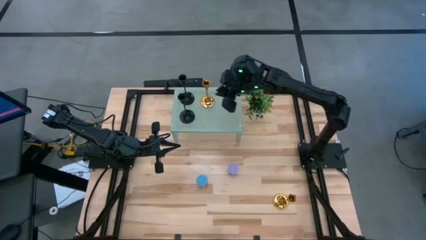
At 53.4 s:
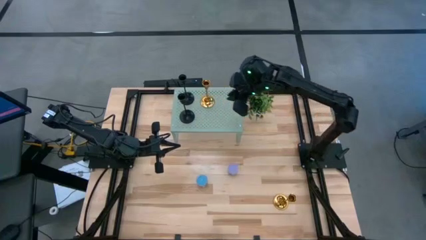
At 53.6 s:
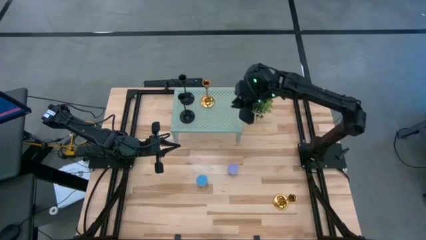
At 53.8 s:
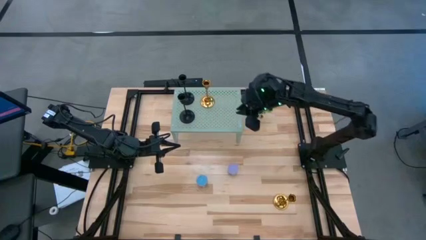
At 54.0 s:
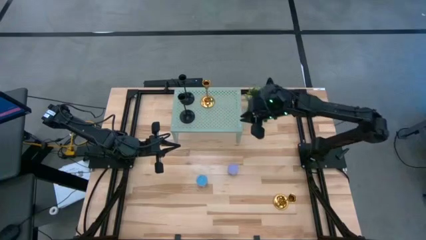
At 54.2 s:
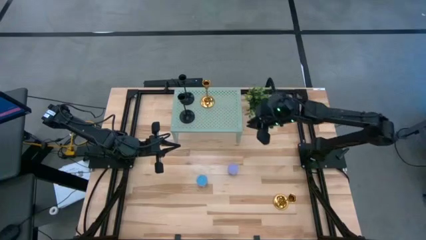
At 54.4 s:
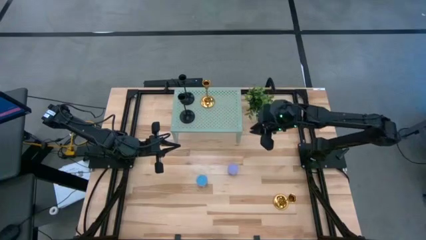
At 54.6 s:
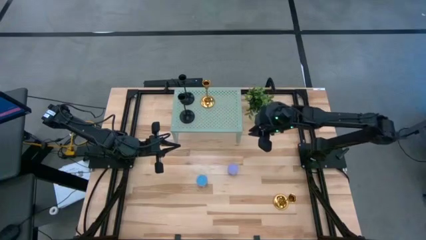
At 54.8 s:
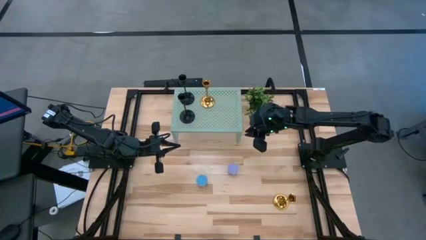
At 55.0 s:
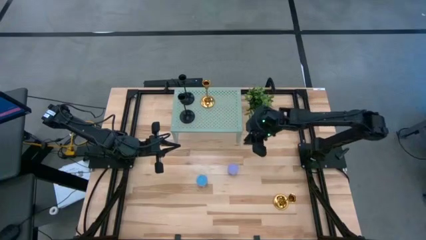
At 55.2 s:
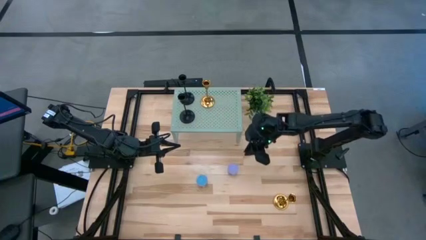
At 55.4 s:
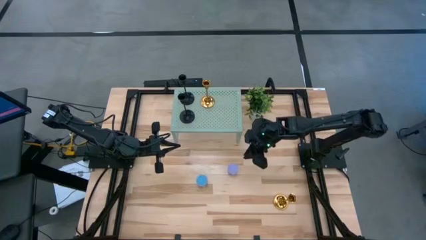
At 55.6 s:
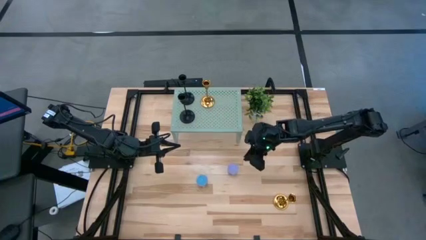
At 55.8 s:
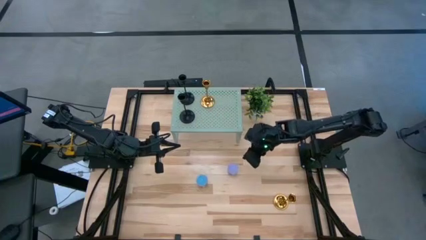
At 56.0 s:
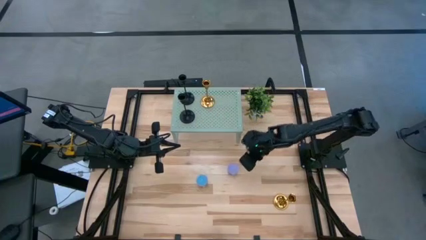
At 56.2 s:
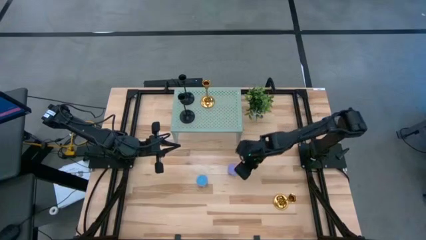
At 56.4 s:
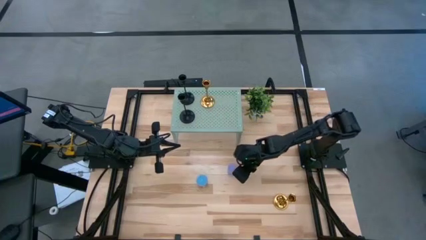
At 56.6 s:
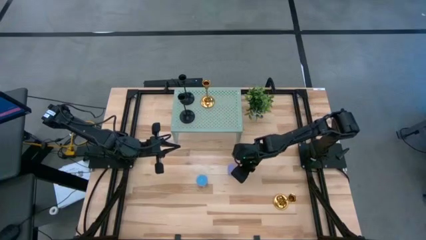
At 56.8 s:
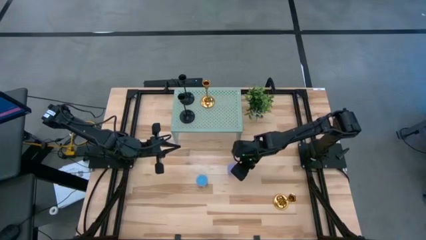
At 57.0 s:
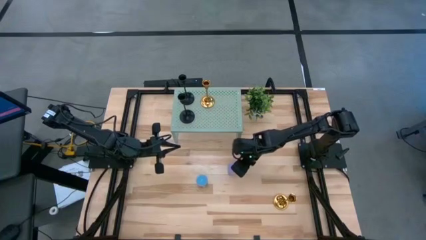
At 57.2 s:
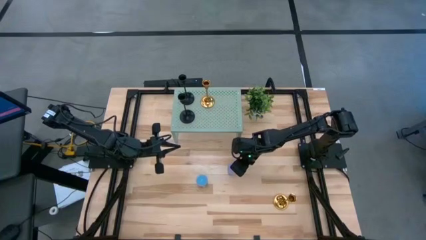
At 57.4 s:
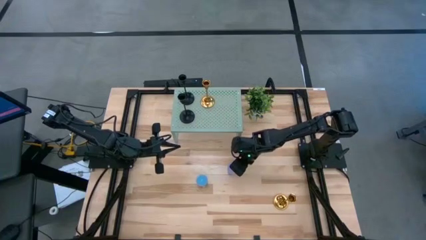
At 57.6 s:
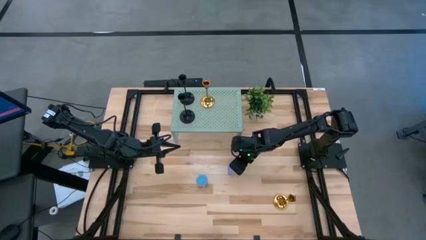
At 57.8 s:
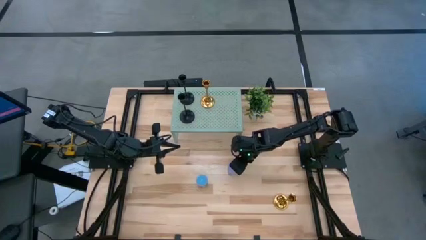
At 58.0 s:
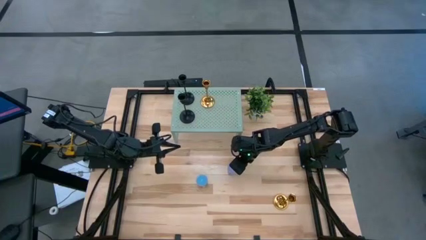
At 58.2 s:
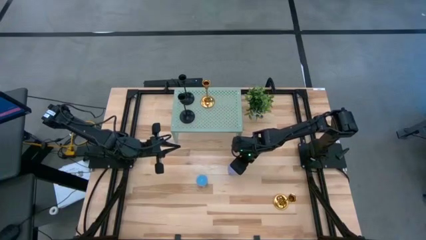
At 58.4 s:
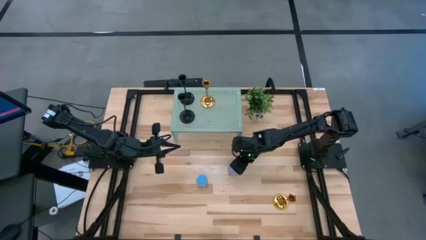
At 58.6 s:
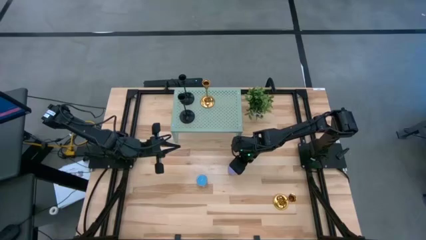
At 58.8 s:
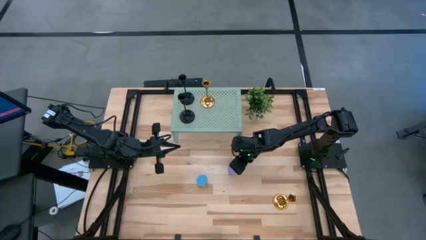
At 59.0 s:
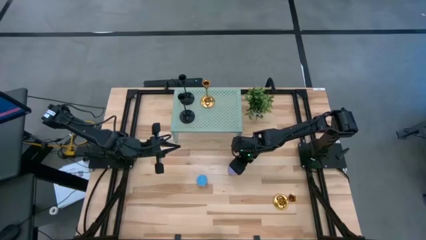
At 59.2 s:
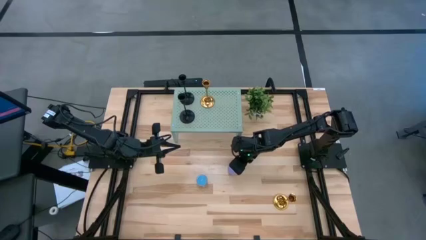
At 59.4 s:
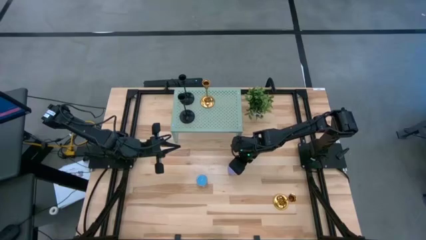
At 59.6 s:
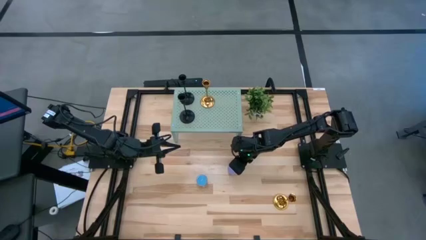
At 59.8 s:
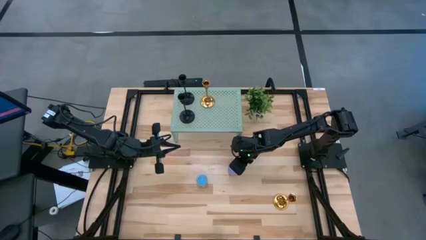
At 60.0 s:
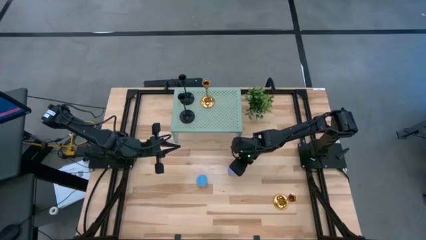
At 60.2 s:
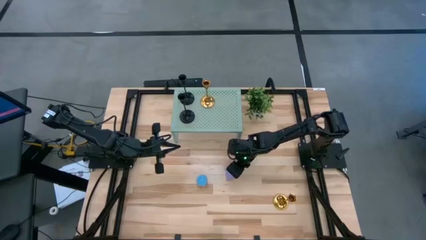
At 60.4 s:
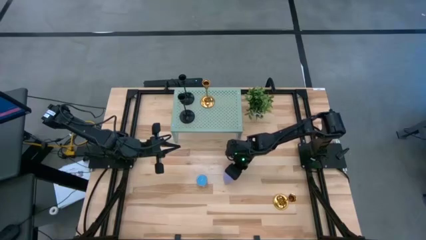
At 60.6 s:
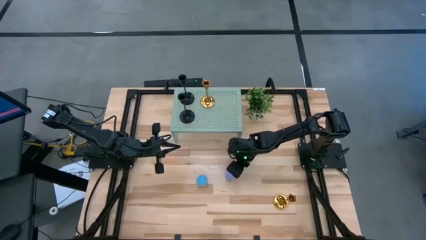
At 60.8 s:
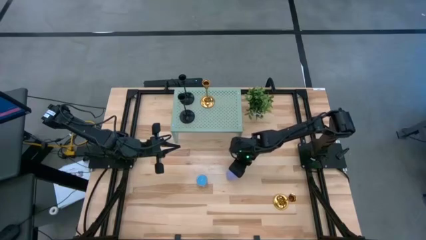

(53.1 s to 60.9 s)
Task: Pick & Place candle stick holders
Put the violet scented candle on the shelf

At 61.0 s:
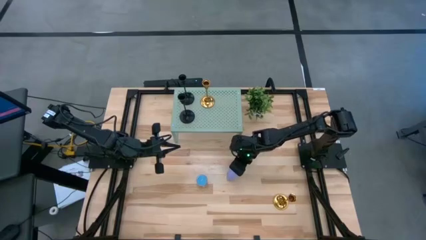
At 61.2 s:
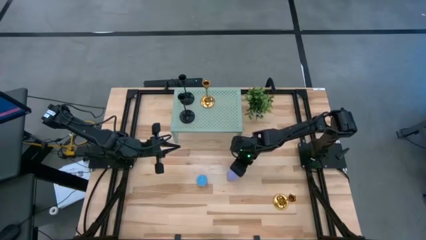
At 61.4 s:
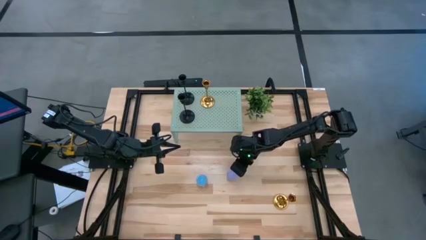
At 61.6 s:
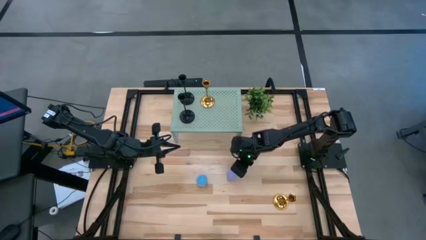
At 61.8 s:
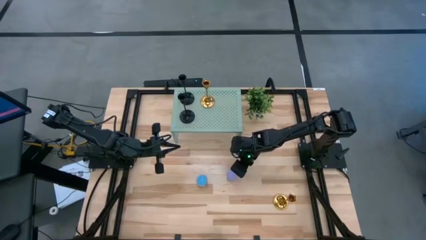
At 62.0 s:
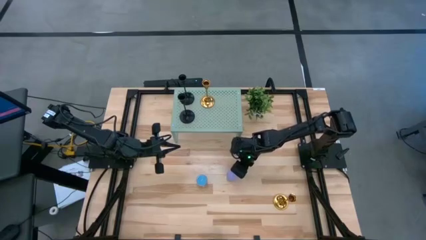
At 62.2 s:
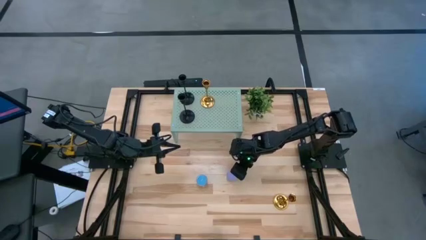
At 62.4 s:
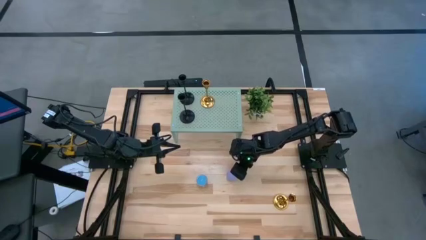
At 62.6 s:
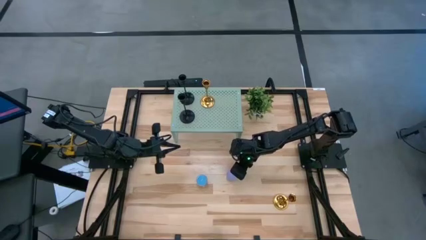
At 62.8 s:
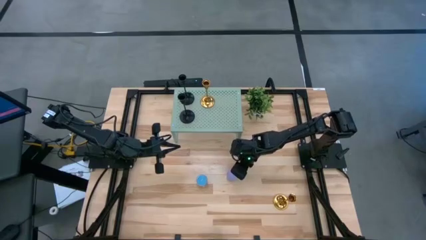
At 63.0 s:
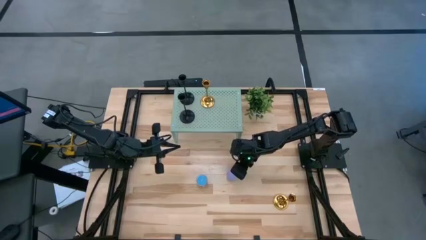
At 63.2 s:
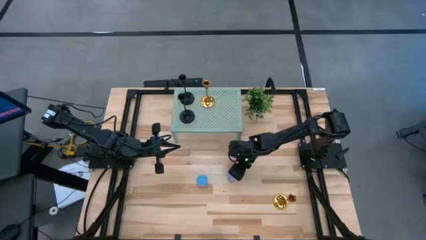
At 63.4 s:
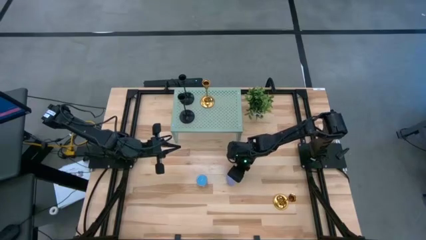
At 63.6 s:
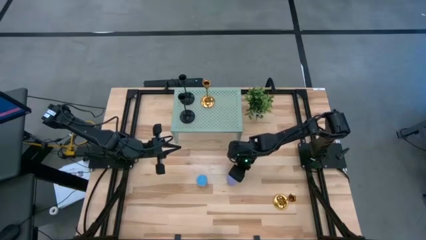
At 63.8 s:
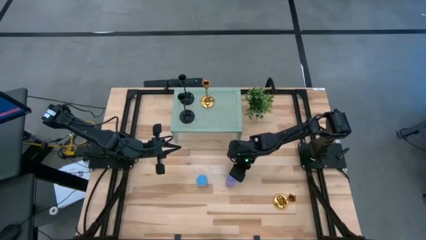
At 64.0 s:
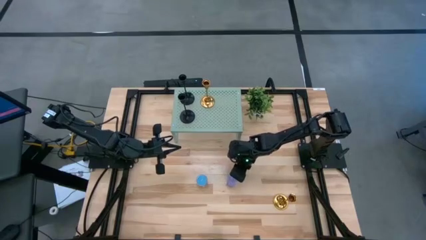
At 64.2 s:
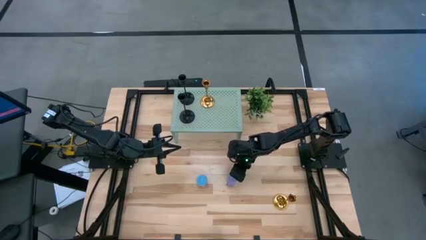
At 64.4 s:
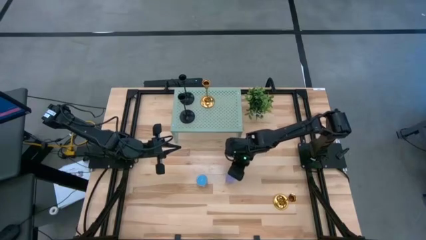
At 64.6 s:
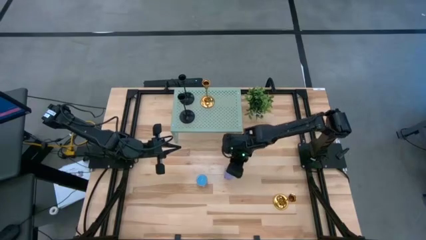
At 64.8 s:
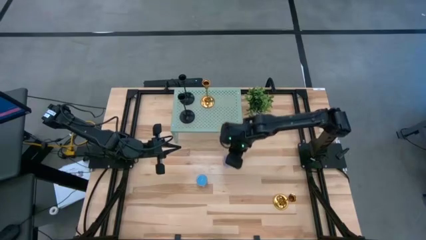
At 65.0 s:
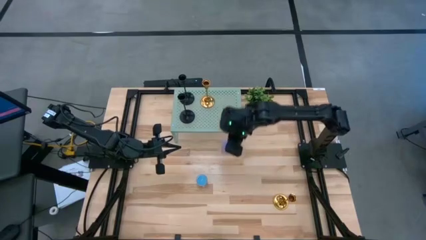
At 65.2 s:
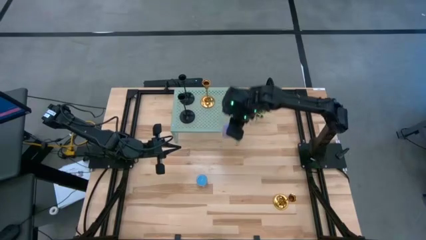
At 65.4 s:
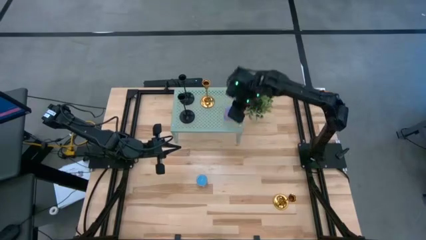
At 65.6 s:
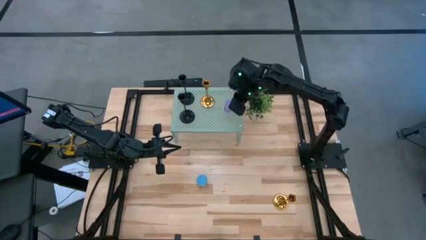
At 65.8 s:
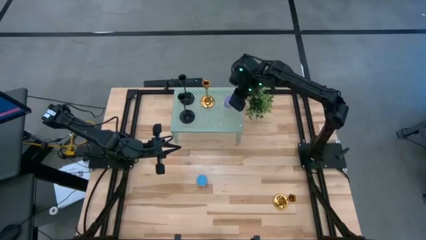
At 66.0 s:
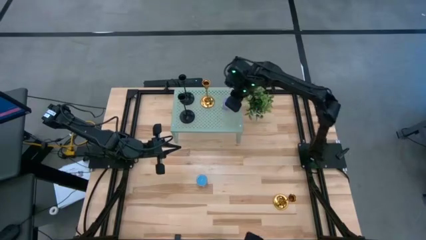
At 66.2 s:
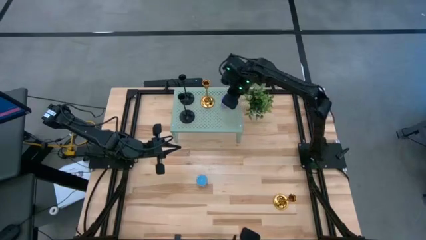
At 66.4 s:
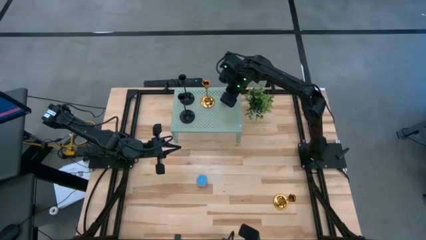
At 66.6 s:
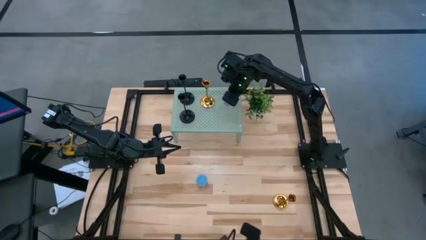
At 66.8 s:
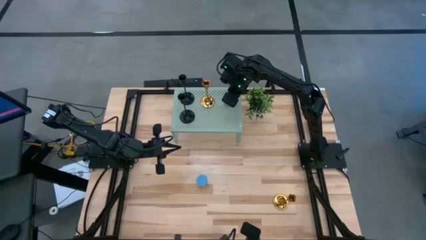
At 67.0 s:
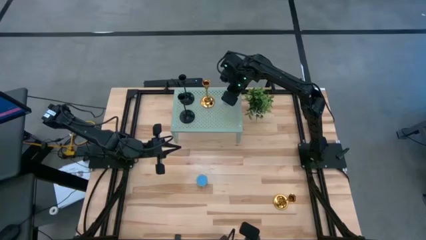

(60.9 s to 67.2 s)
Put the violet scented candle on the shelf
